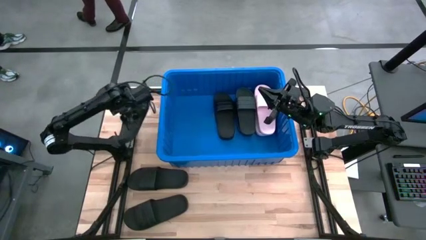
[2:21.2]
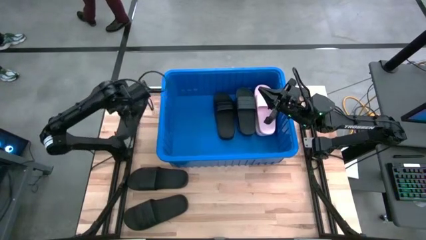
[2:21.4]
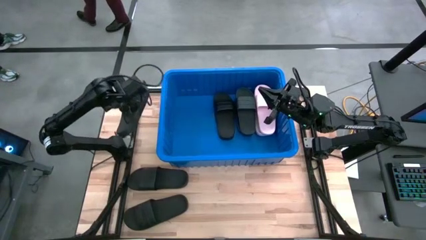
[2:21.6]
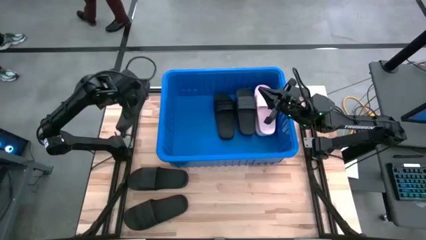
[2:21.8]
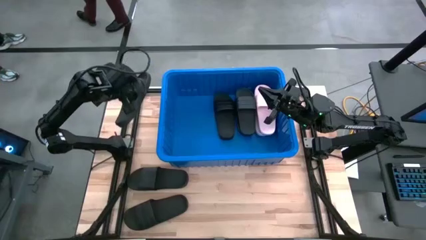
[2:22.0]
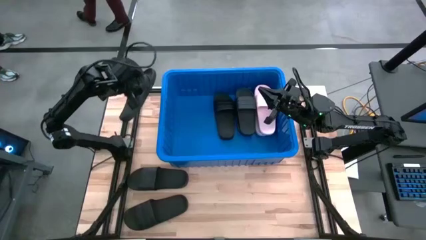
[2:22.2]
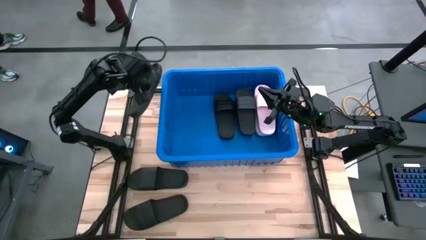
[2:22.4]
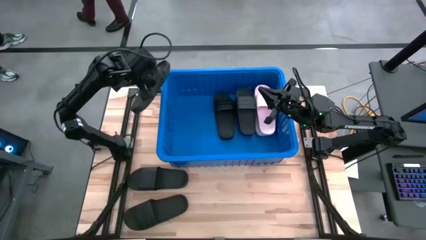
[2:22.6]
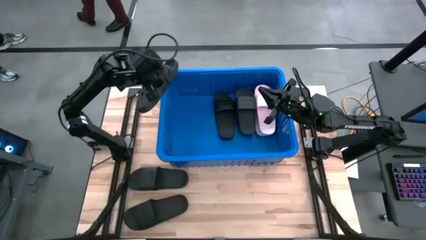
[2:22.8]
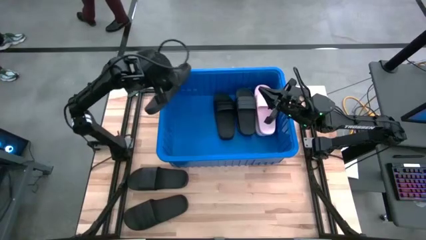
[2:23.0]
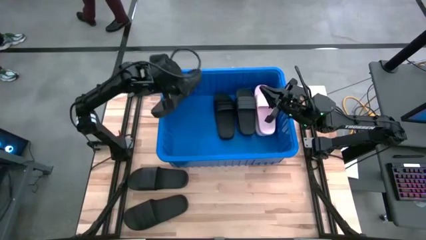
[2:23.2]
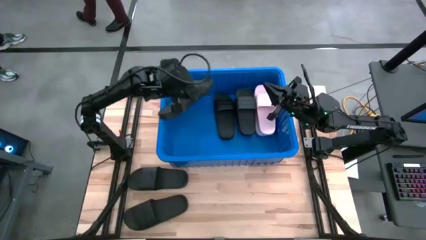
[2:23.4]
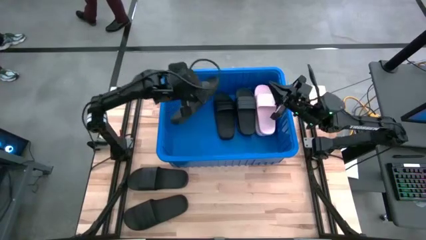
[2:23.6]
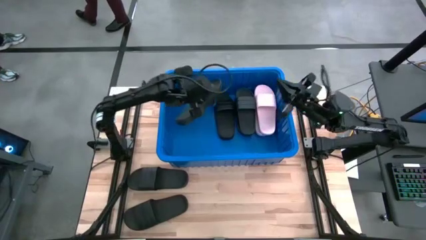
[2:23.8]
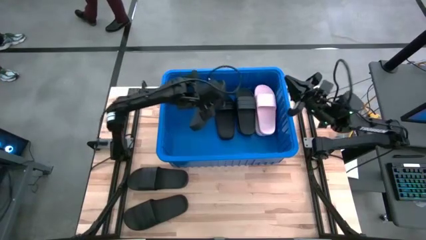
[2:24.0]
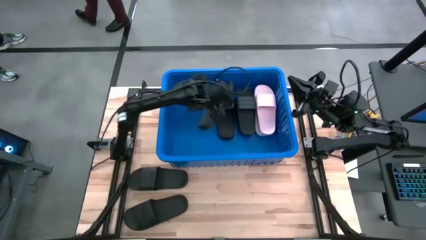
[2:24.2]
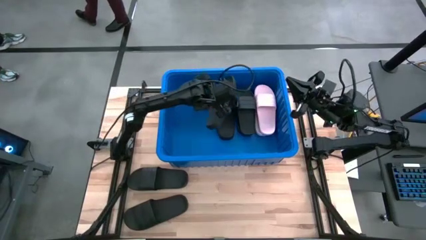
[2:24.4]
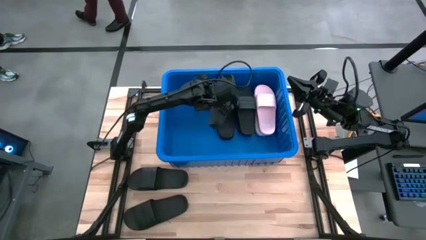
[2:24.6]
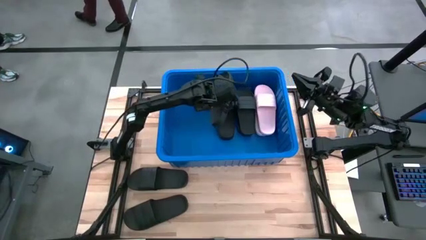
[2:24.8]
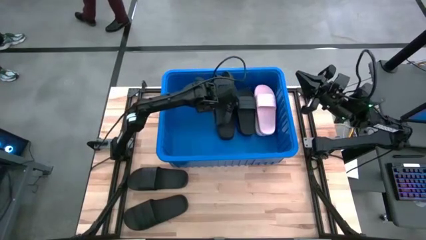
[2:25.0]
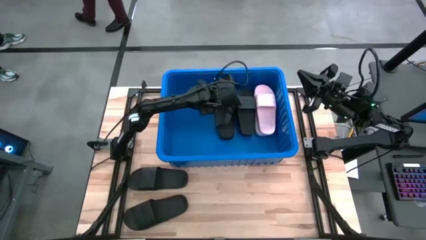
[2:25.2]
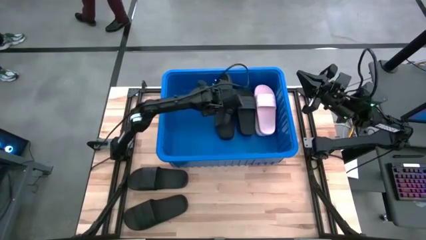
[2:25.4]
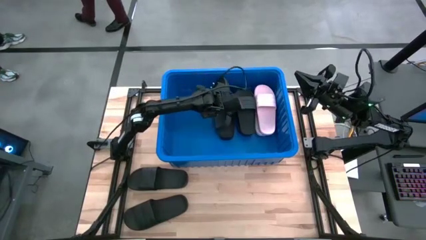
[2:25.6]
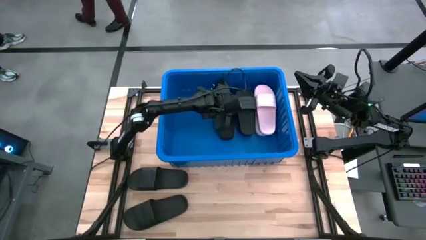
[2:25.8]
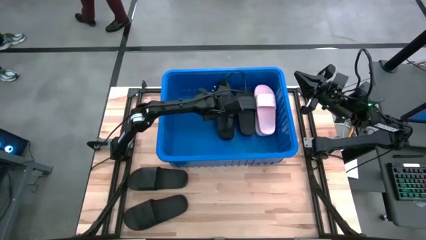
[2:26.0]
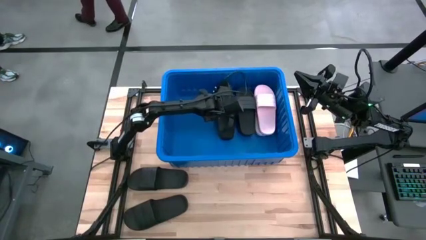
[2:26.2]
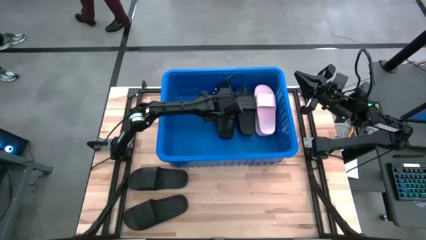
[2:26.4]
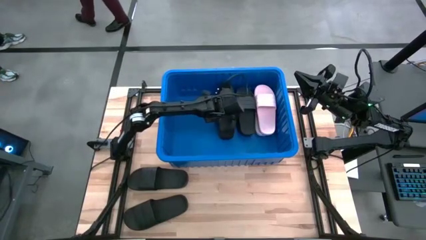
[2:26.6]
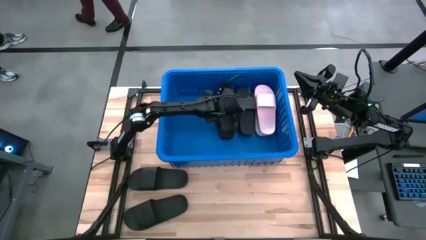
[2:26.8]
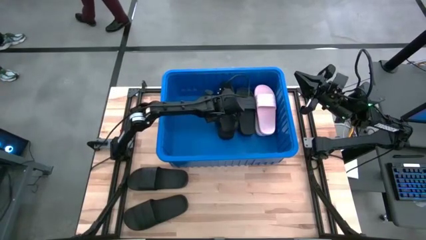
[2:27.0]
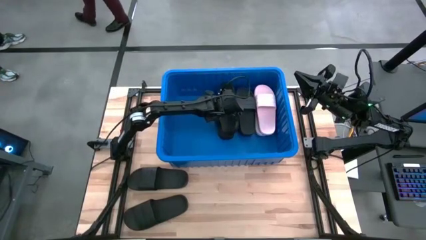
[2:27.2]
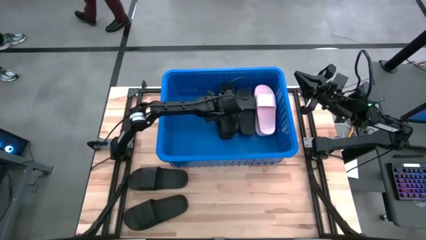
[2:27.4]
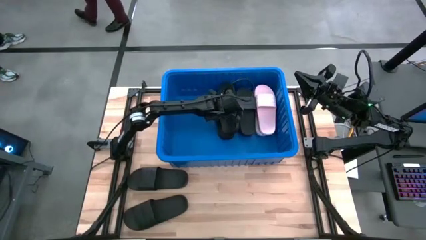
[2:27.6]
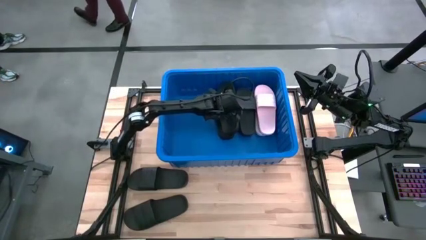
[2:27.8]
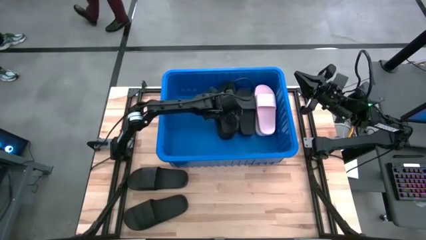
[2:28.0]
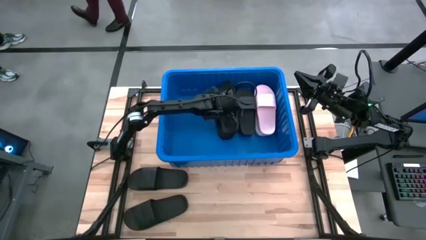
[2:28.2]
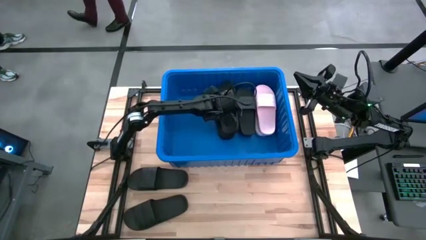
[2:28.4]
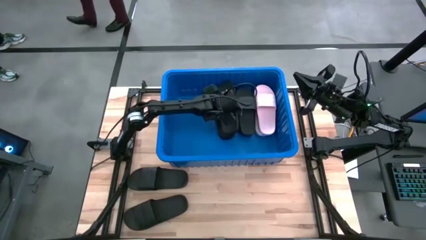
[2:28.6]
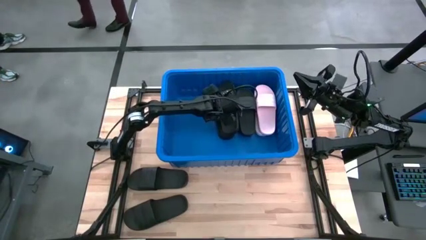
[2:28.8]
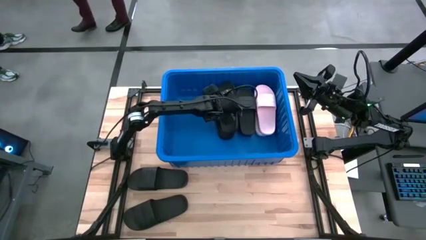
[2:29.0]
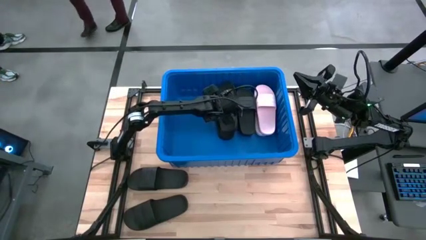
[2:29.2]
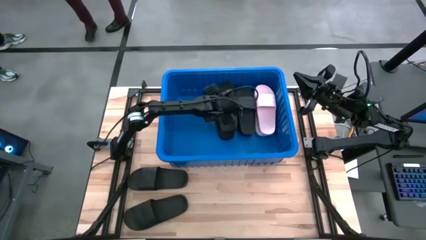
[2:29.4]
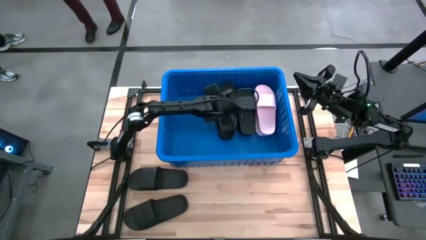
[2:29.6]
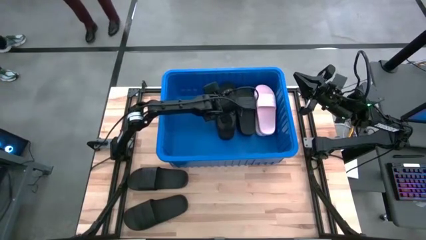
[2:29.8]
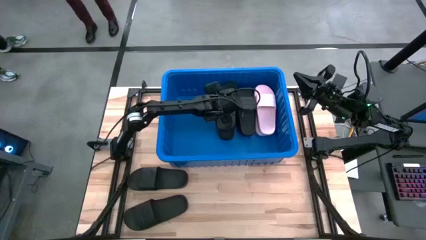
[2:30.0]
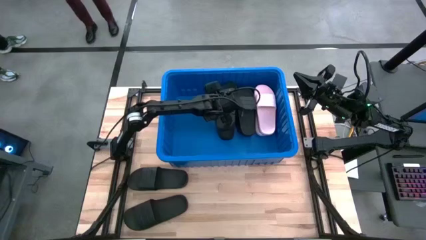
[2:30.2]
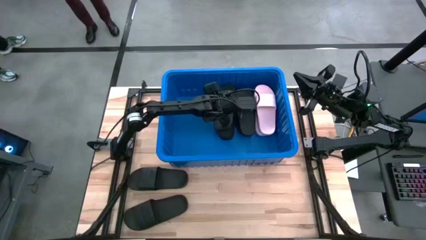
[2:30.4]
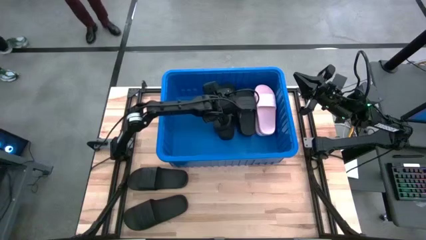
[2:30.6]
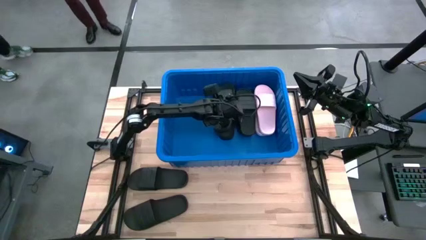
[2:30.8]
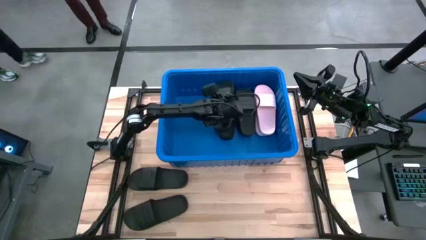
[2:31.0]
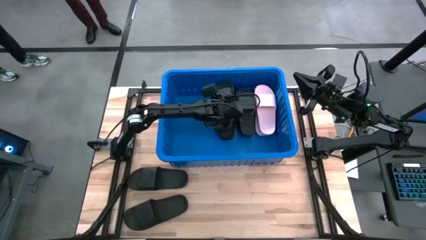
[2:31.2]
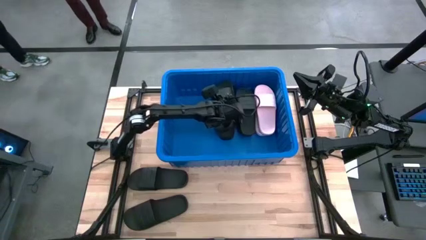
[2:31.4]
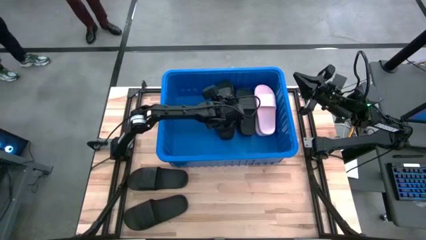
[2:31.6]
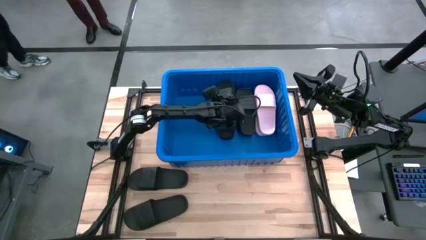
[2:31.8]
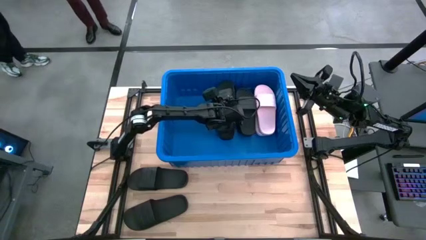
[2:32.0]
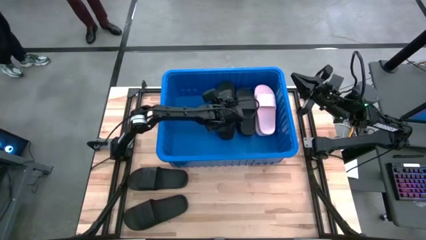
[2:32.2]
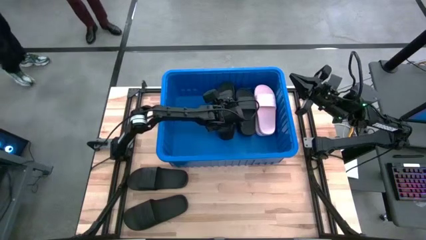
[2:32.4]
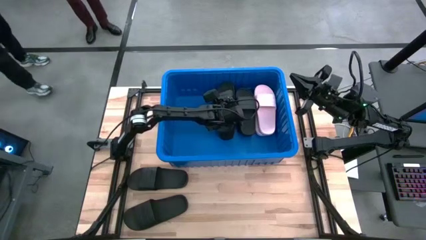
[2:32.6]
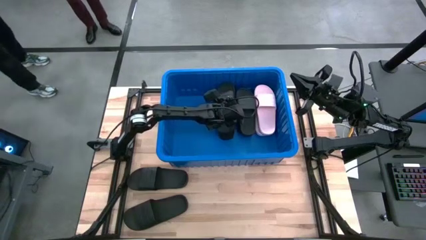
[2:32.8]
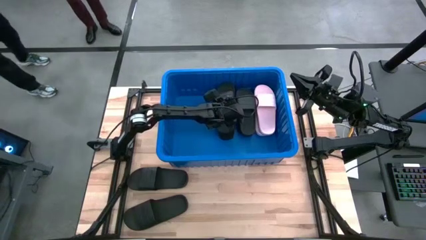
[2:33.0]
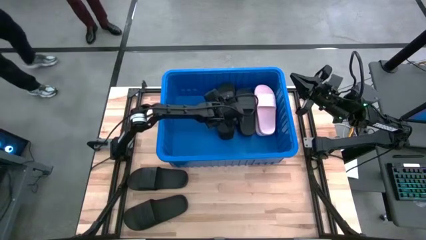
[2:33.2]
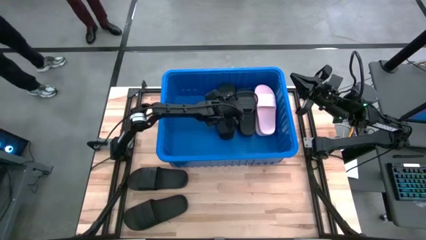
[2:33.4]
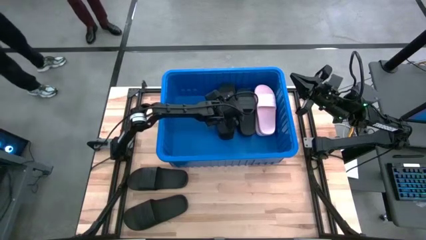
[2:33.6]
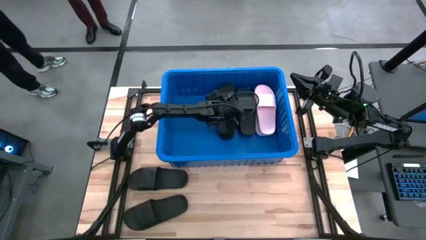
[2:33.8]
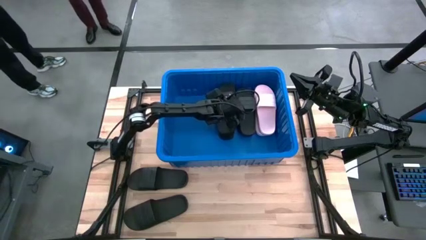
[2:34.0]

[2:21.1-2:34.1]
Task: Pick and place slides into bin
Stack the black slide on top of the black slide on the blue bin
